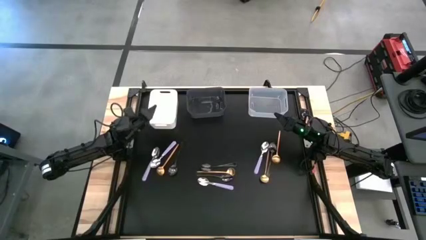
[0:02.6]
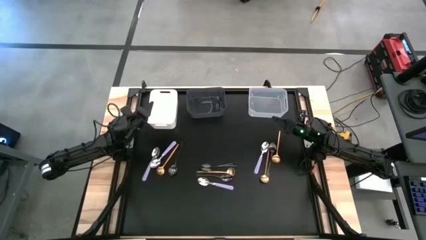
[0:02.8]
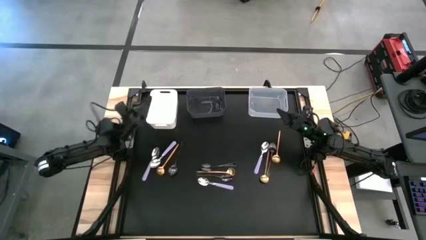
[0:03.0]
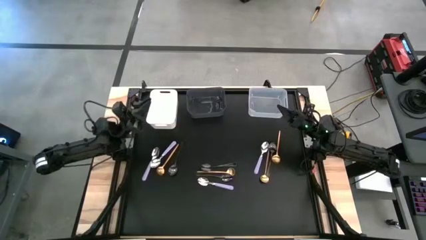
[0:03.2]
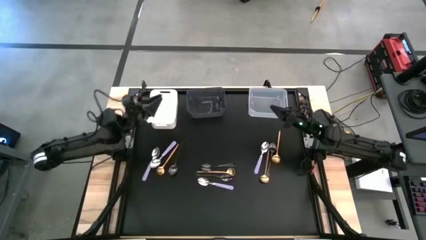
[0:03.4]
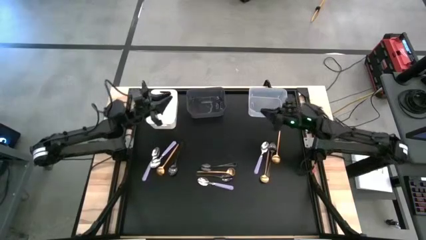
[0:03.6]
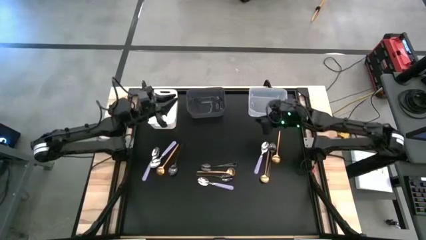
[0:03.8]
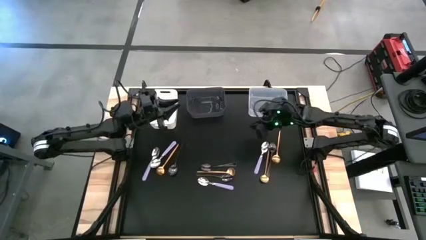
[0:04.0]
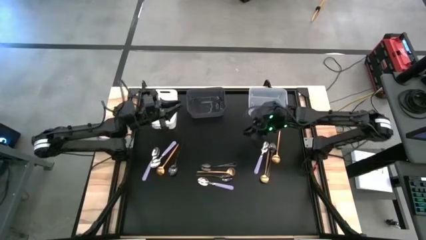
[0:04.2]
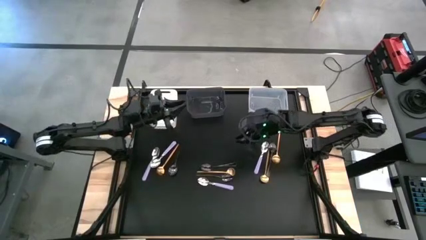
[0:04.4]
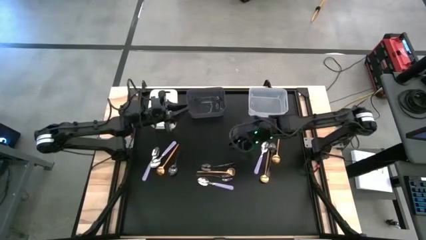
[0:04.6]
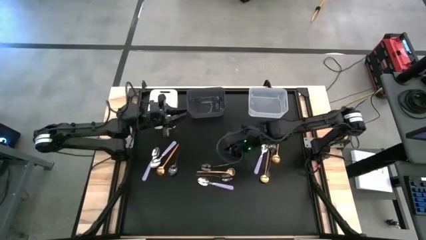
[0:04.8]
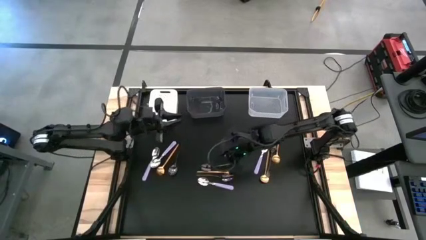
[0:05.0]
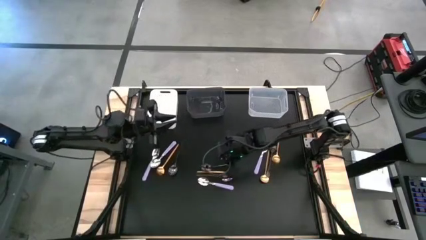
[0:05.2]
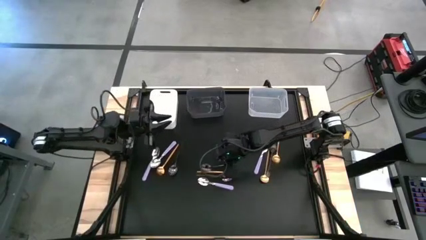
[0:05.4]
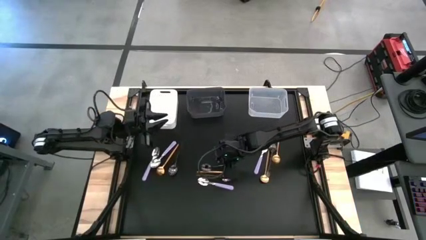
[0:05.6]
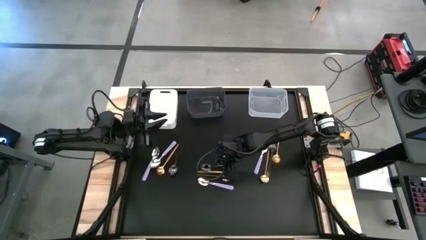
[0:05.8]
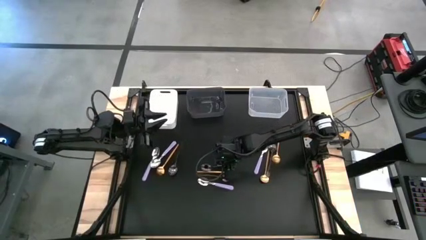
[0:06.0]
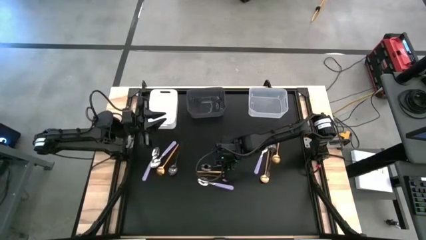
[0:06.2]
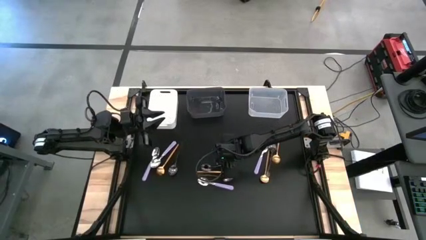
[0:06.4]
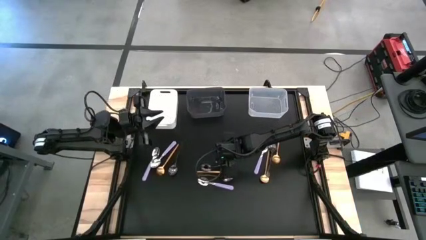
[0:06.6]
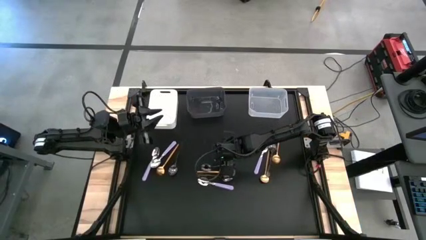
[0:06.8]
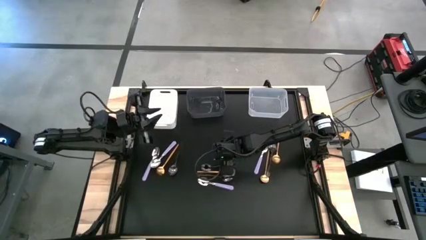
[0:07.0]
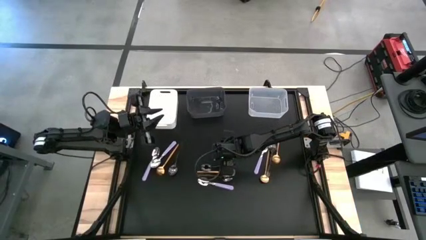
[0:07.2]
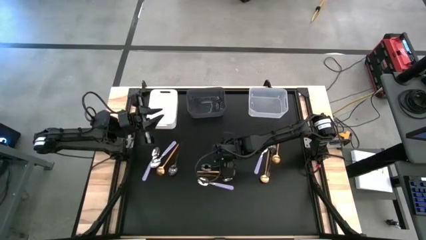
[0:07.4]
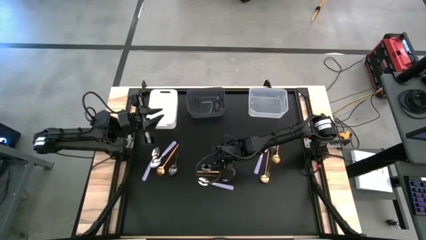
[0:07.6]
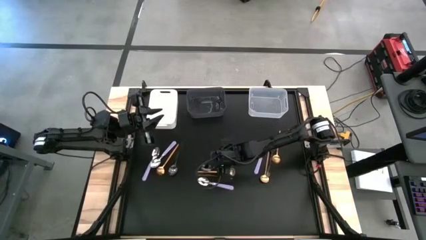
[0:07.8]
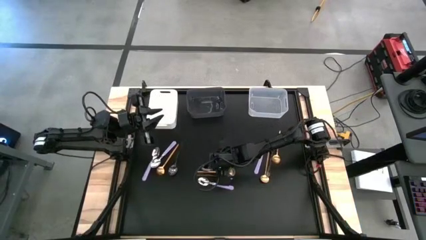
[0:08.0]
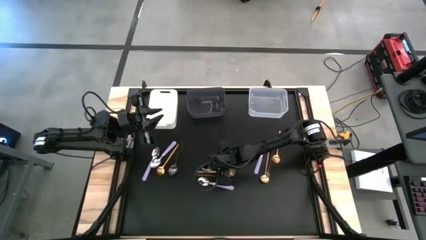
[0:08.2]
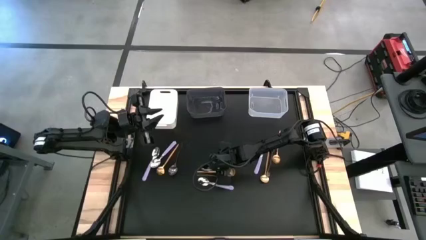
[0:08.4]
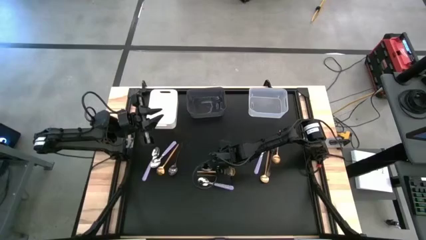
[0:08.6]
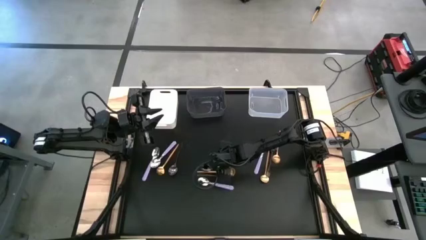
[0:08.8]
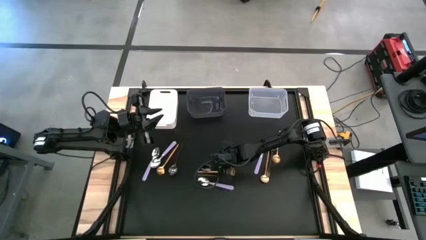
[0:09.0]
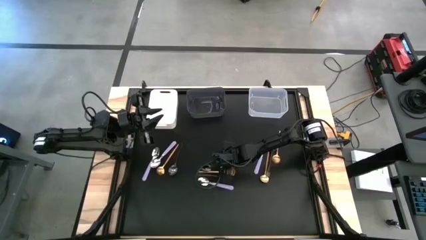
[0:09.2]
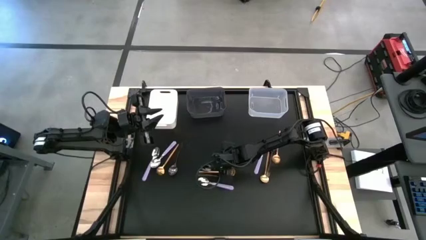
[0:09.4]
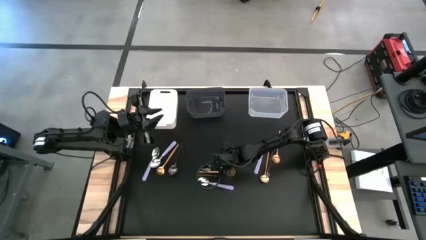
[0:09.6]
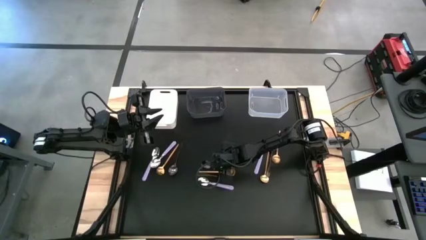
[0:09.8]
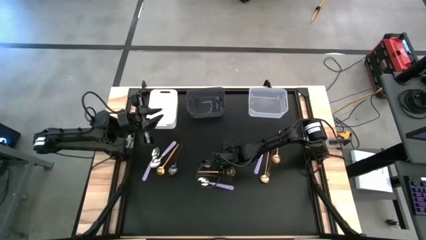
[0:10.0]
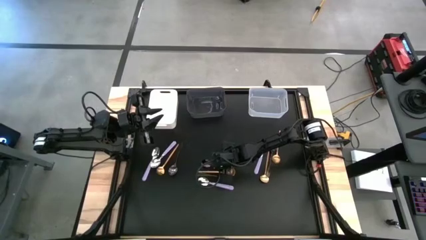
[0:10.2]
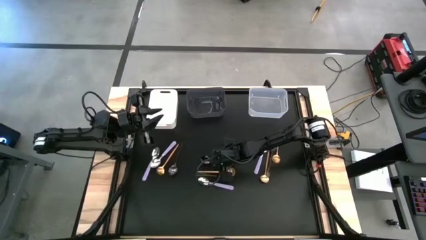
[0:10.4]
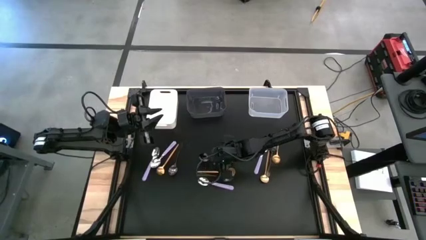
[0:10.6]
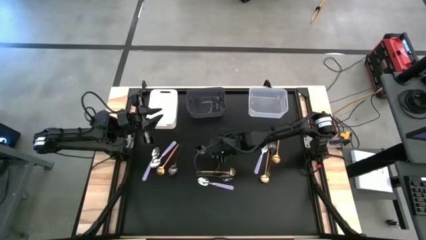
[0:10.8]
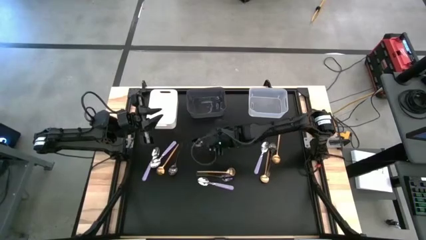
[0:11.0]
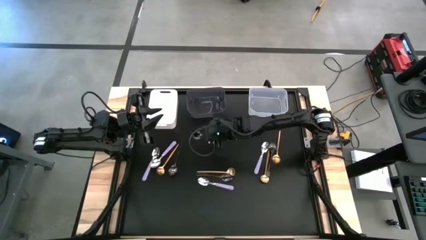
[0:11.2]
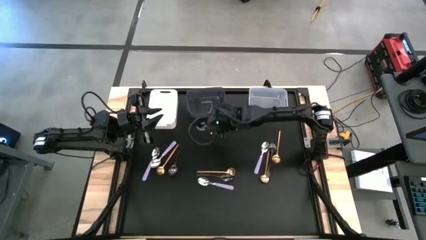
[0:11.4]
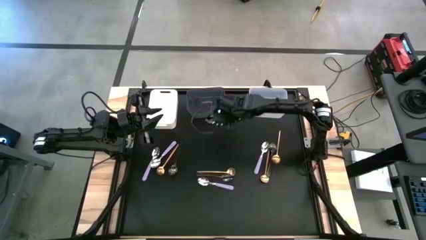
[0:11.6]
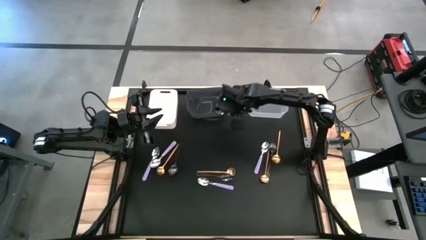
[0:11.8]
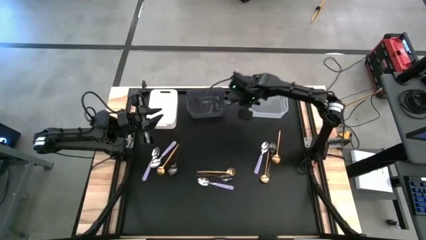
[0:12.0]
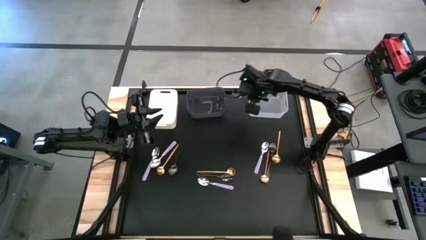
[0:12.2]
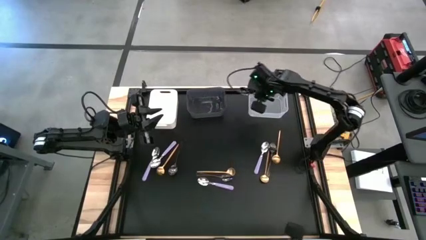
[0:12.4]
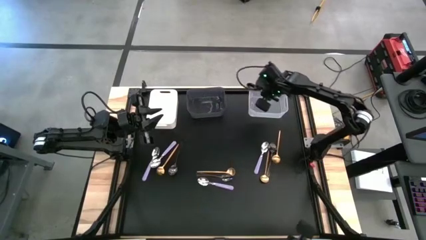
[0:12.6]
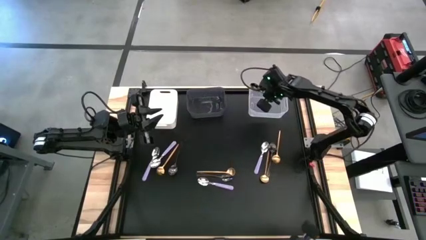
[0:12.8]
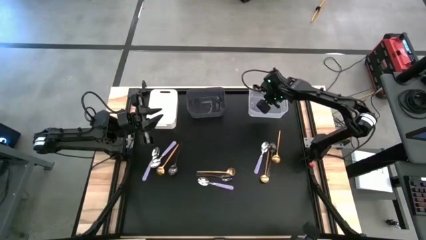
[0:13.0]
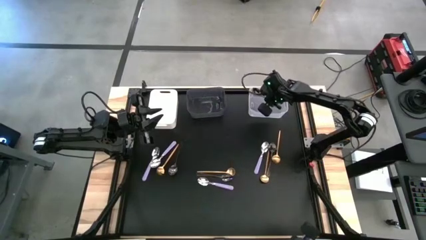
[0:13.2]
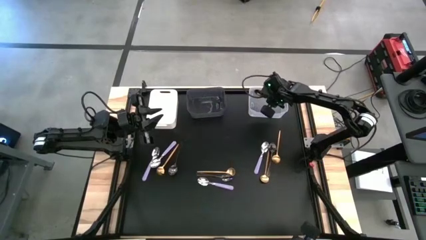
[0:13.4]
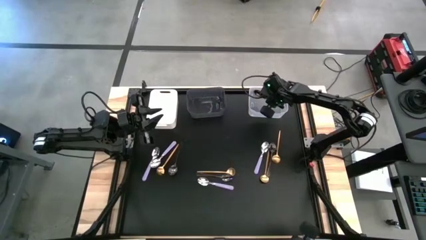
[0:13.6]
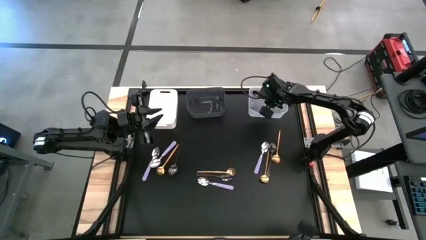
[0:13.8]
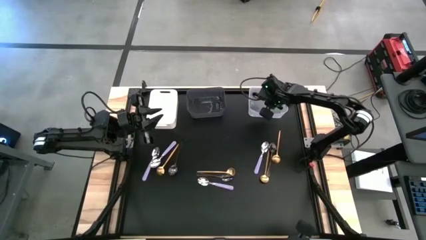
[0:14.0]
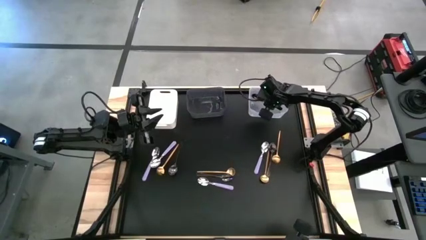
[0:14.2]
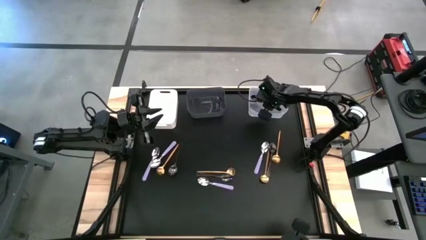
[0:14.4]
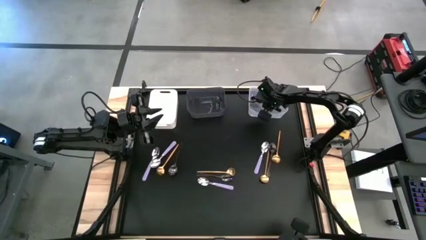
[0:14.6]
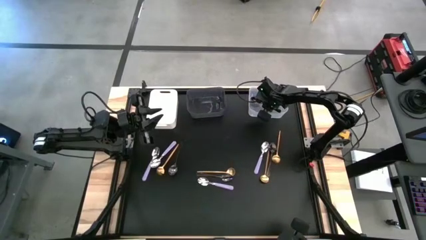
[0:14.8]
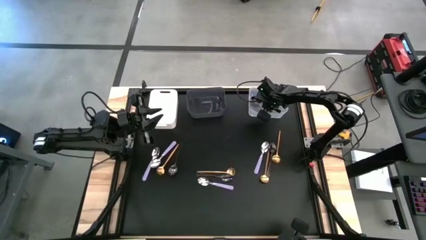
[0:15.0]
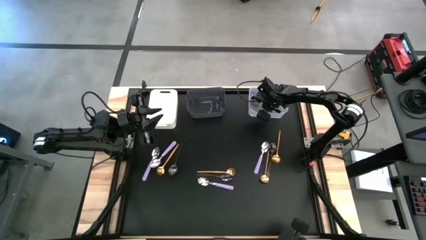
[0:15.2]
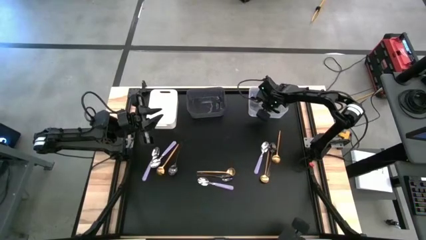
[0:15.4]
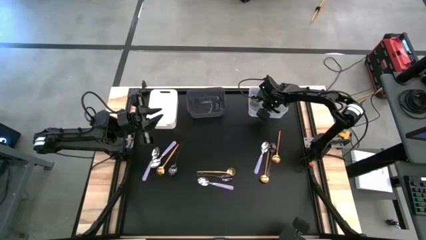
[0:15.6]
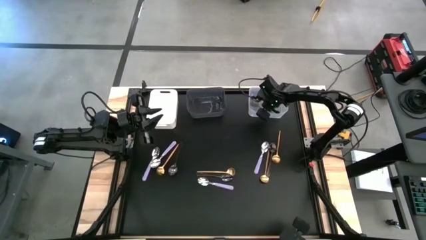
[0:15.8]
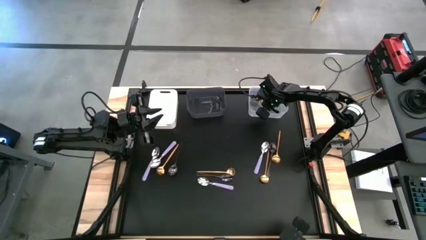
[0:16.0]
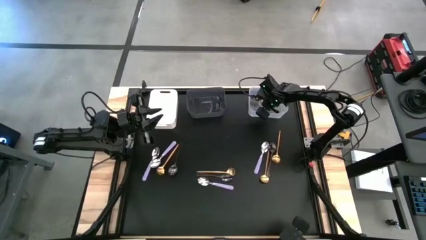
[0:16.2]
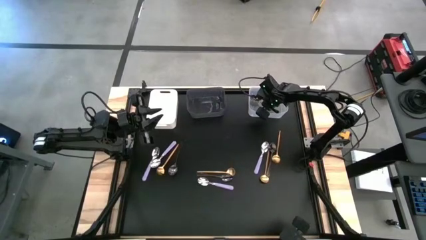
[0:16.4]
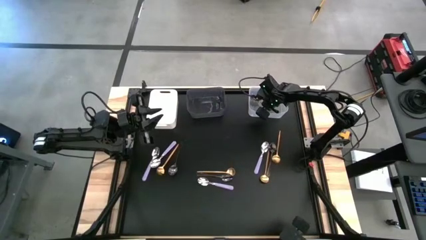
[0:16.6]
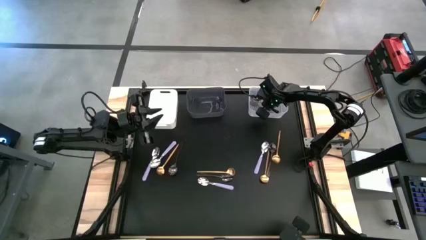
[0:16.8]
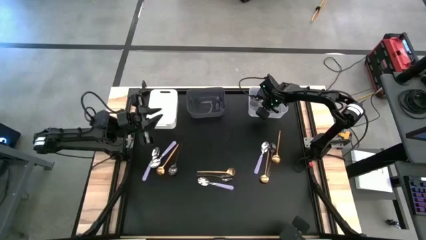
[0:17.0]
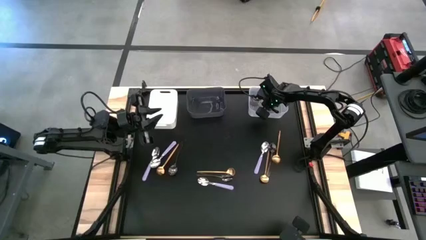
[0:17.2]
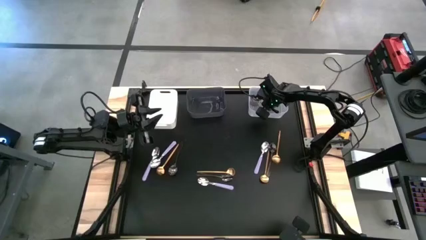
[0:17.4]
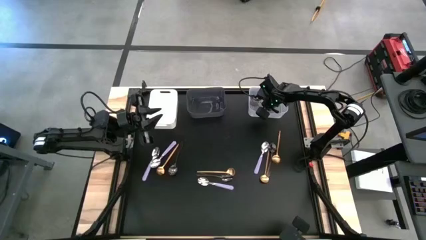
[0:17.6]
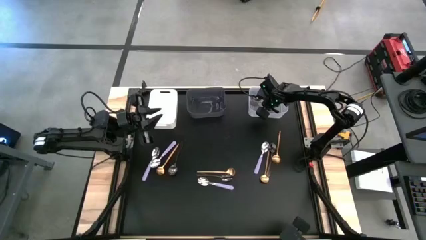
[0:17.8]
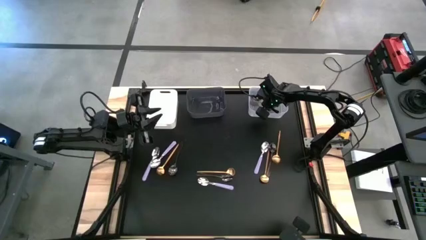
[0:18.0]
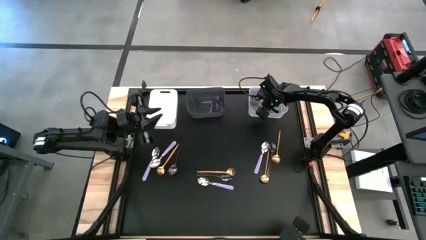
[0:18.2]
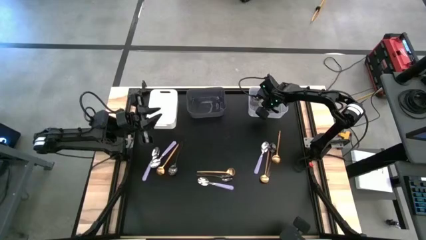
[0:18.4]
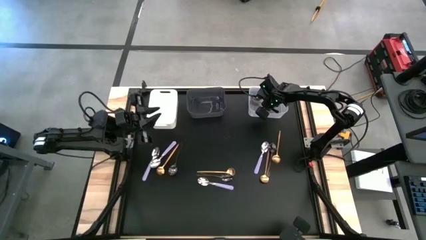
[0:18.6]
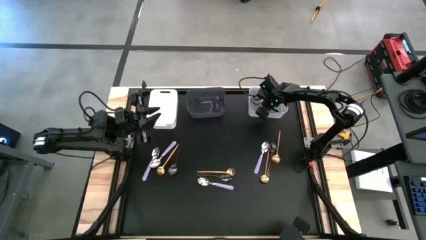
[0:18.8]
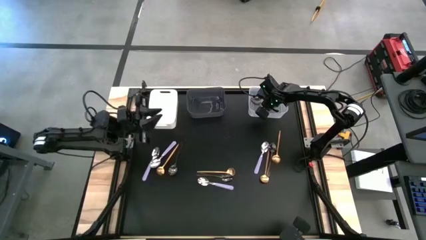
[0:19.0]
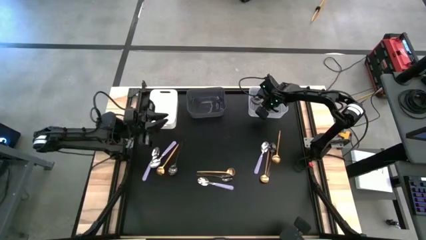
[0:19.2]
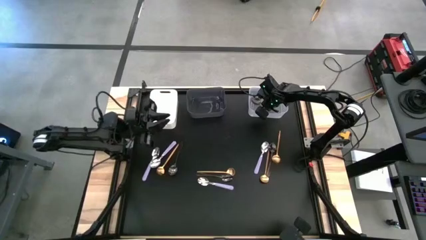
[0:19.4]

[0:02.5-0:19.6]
Task: Sort silverware by color (type)
Put the black spoon into the transparent bin
